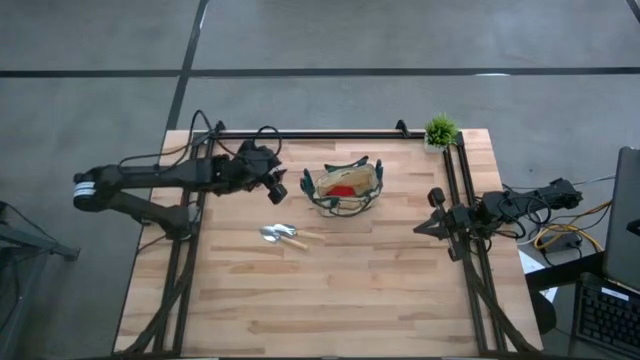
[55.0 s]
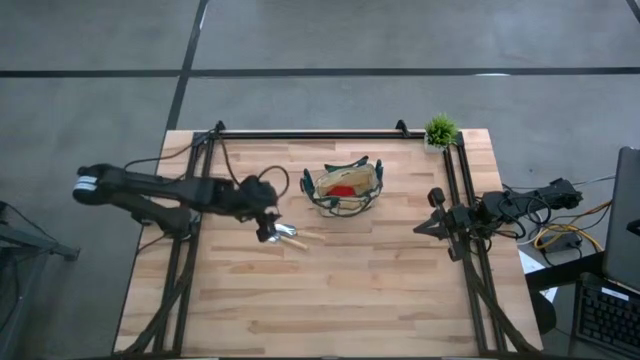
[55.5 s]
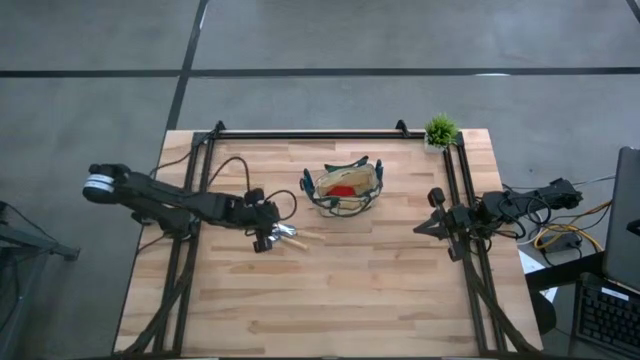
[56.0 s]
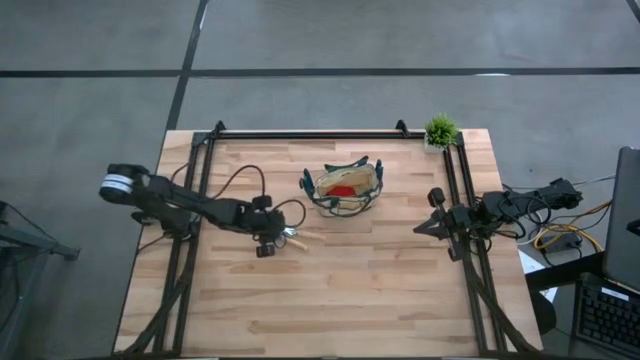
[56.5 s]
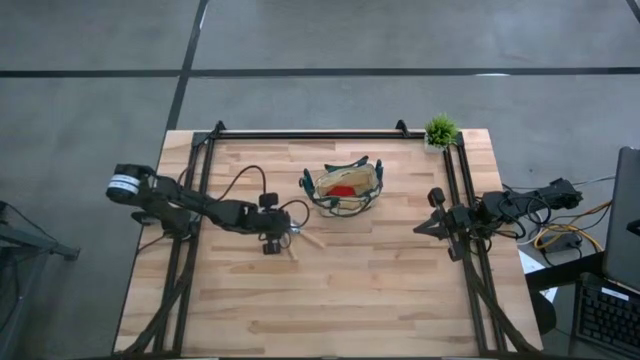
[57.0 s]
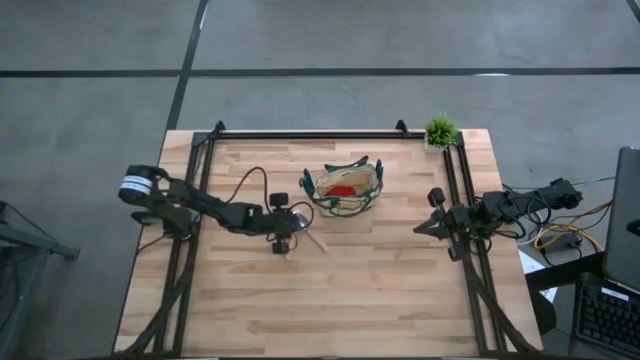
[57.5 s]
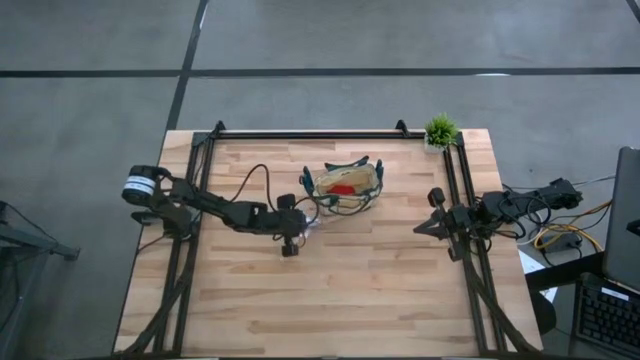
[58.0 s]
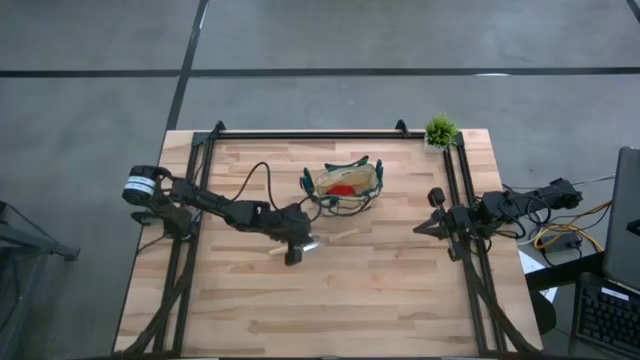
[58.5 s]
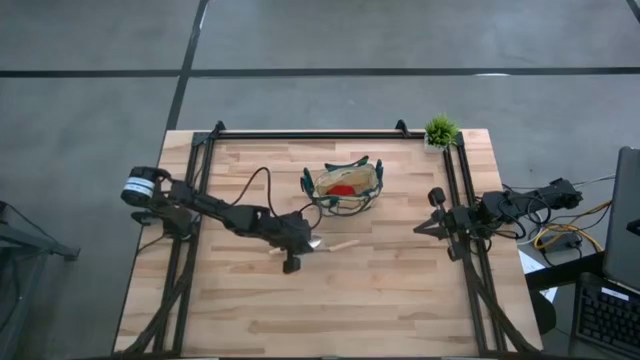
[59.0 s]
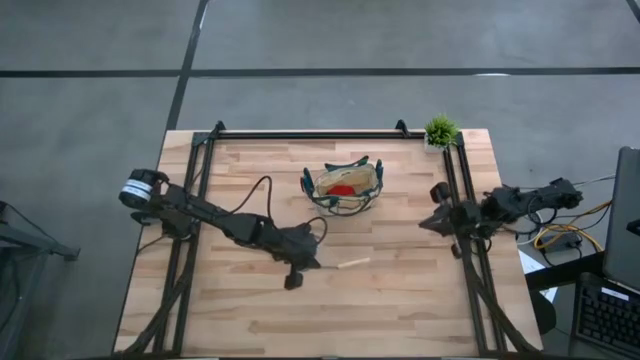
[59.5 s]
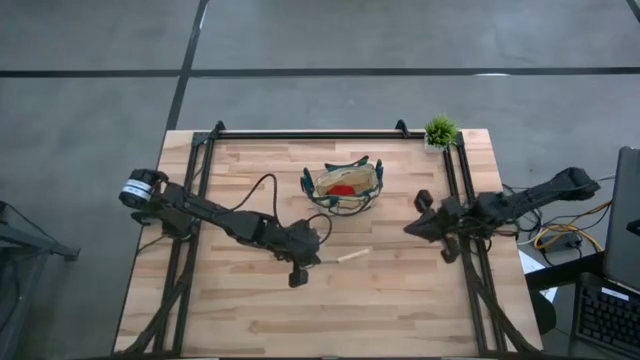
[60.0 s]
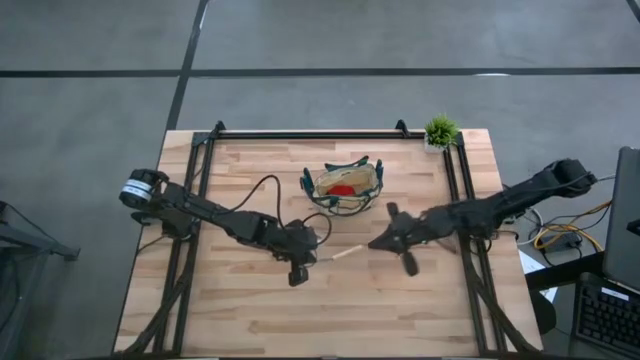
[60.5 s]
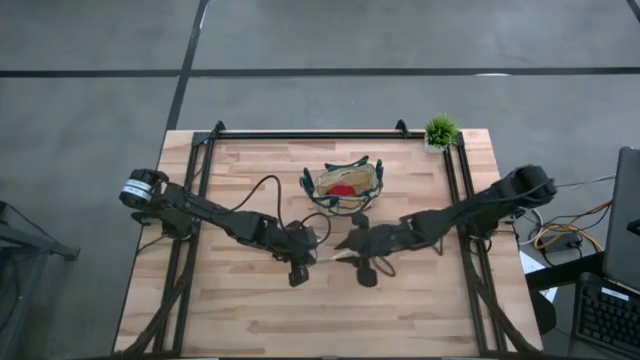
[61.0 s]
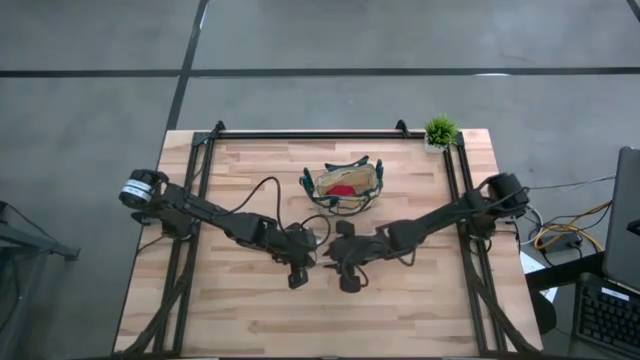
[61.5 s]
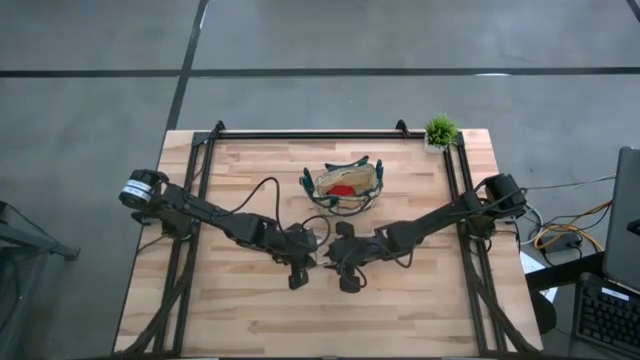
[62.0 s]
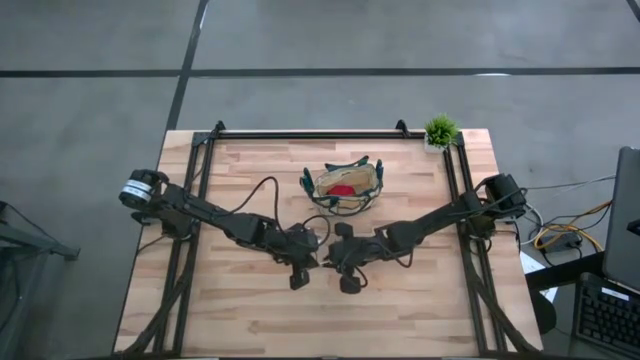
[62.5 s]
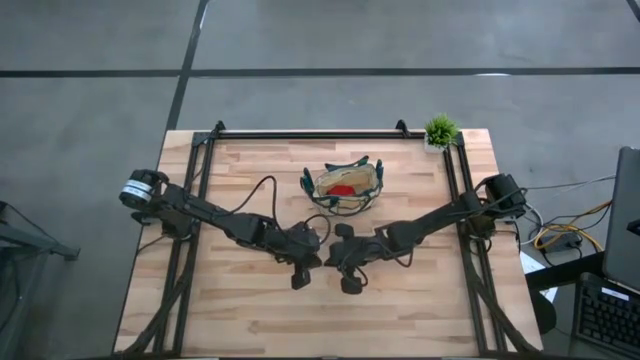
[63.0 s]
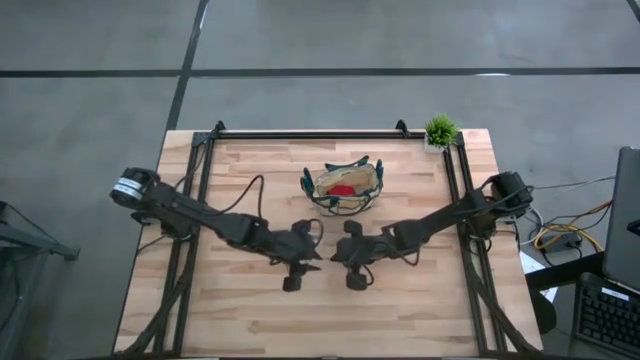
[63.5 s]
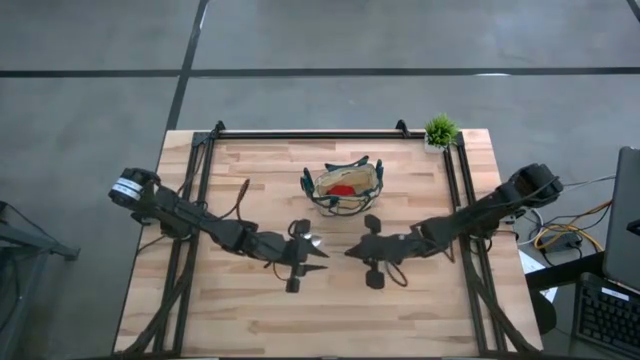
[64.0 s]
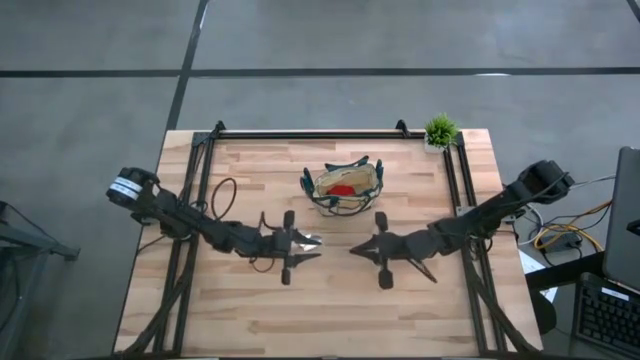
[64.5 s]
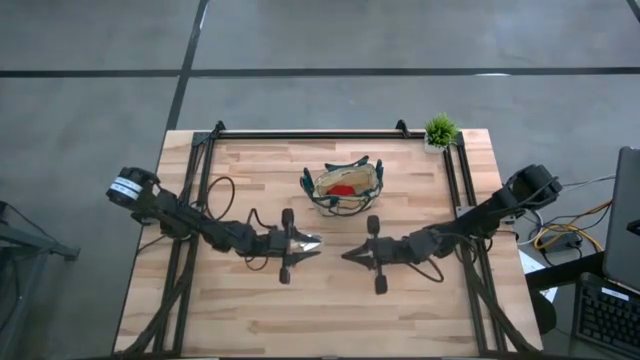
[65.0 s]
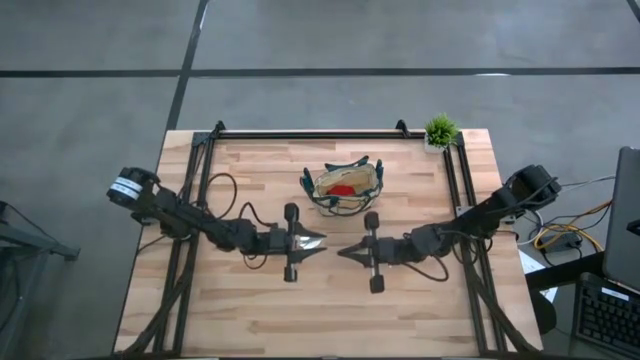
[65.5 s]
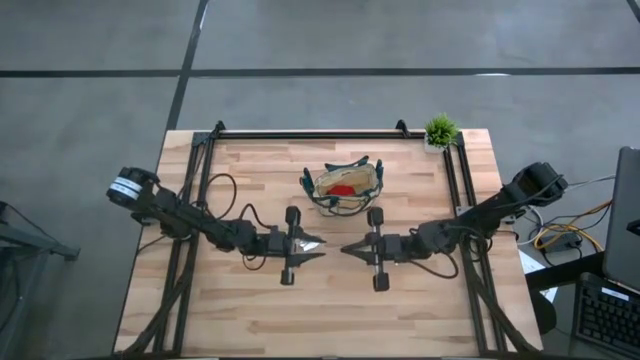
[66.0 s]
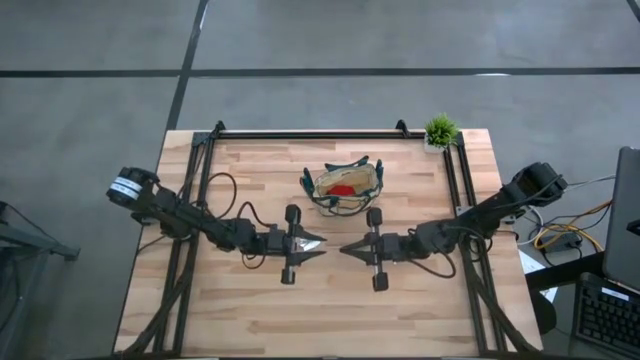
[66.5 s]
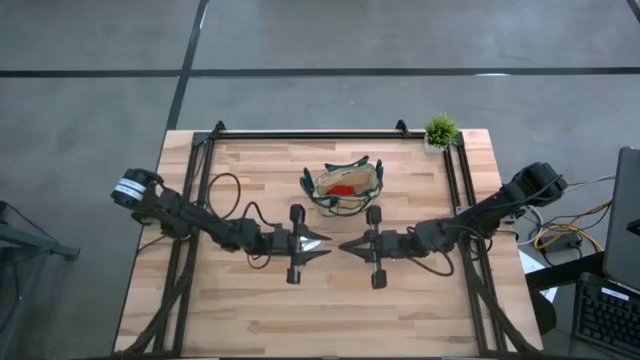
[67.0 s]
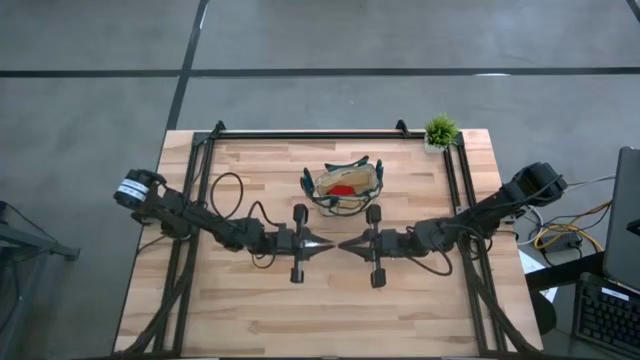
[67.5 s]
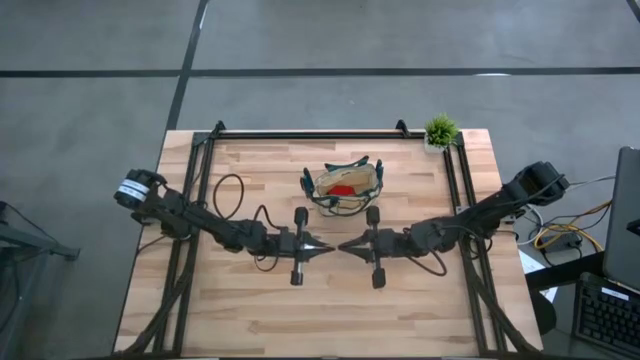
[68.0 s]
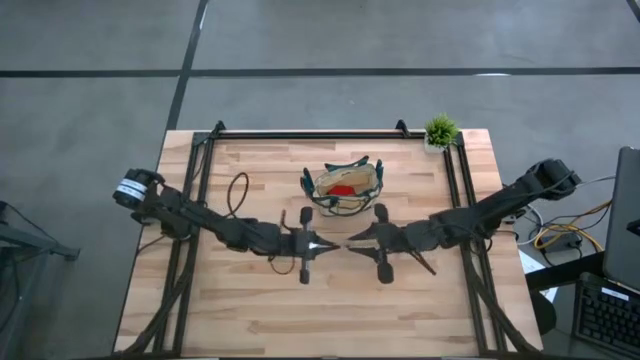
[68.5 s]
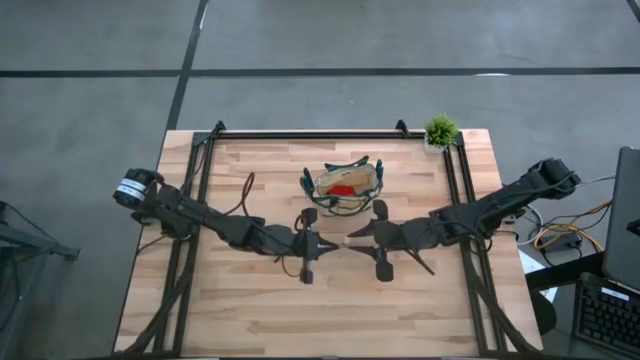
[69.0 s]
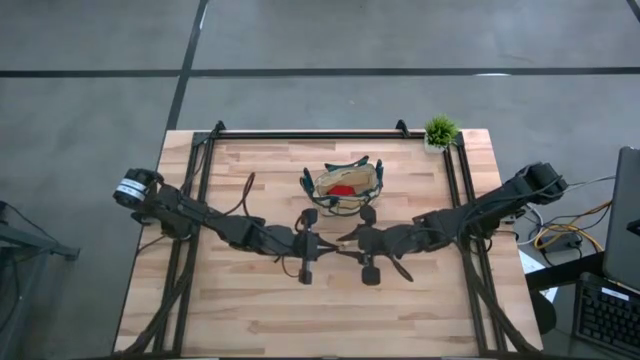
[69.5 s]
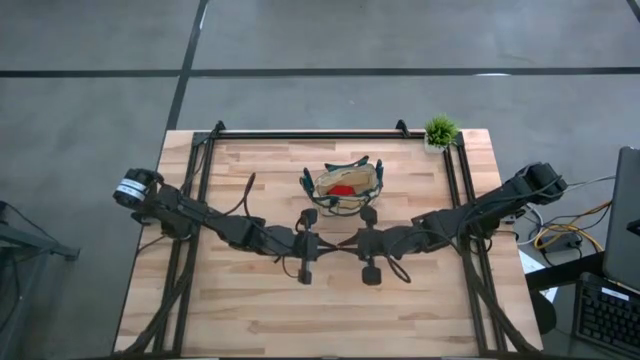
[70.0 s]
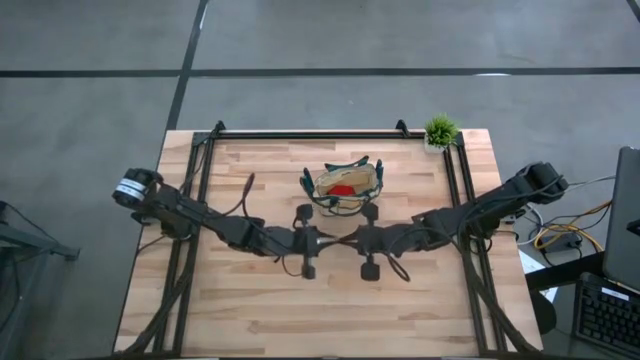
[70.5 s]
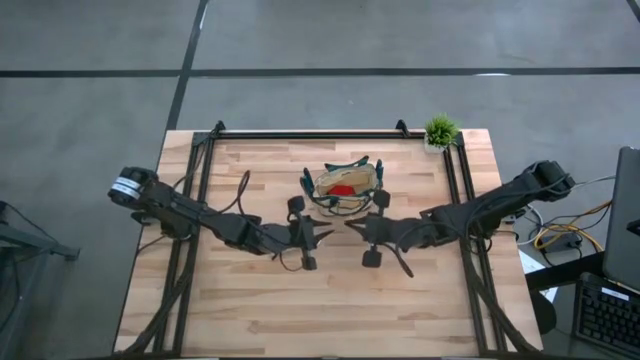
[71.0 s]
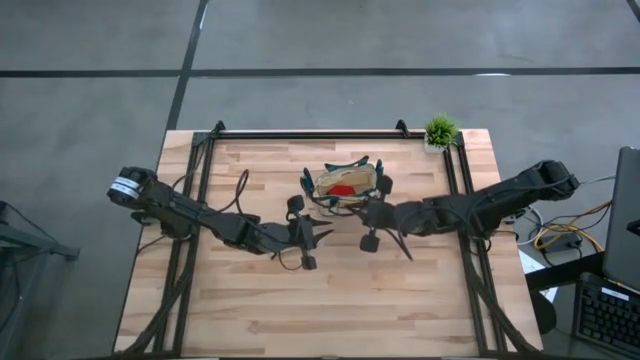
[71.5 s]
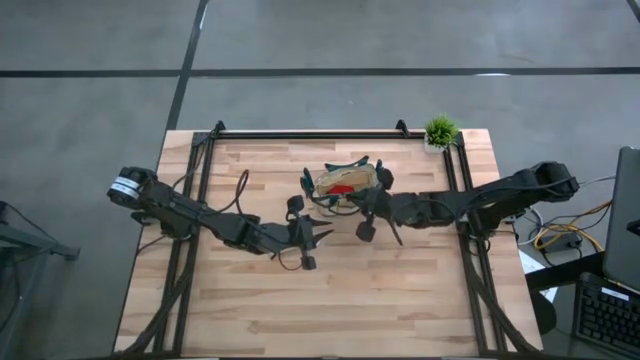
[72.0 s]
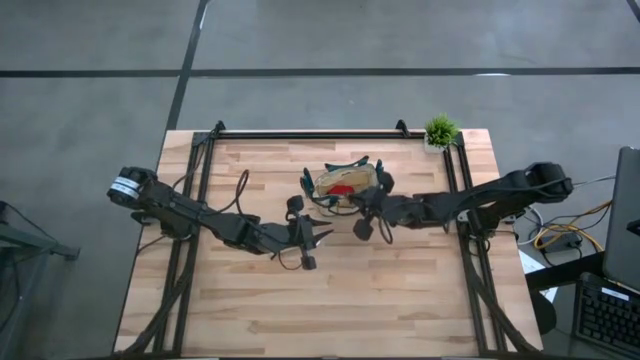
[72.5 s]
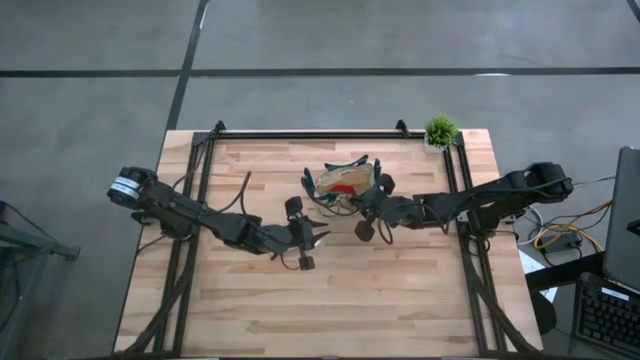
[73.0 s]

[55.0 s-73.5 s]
Task: Pick & Place Garden tools in Gardening bag
Put the brown trowel into the brown bag
